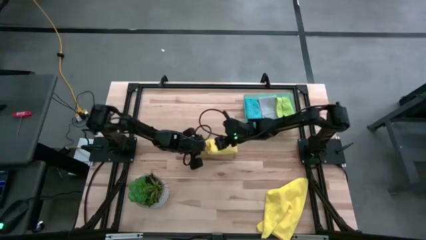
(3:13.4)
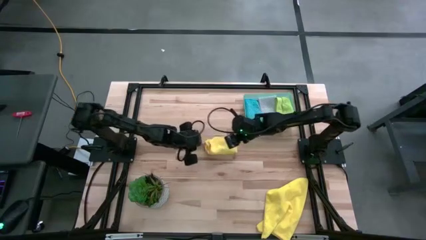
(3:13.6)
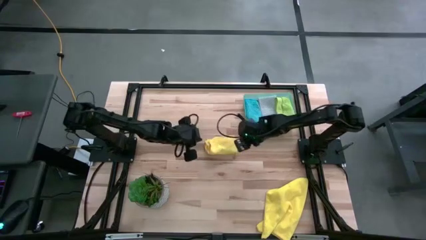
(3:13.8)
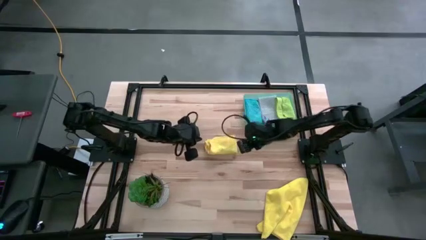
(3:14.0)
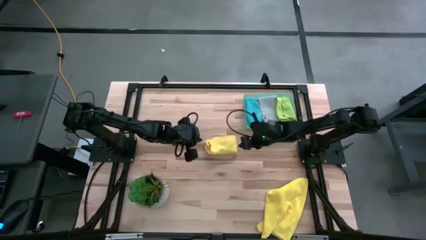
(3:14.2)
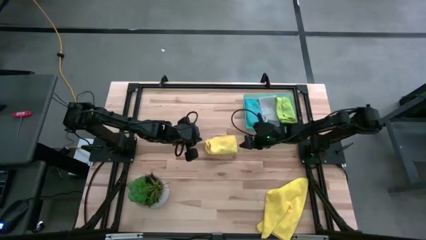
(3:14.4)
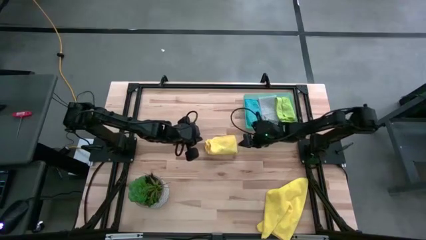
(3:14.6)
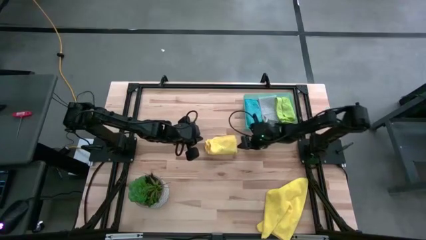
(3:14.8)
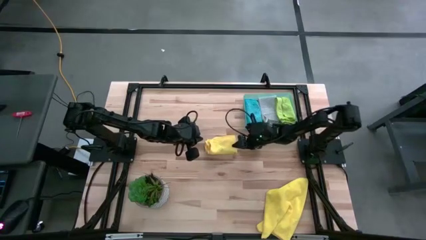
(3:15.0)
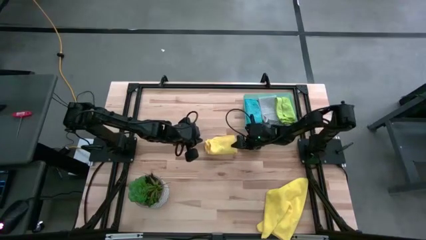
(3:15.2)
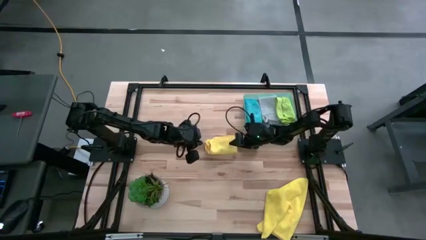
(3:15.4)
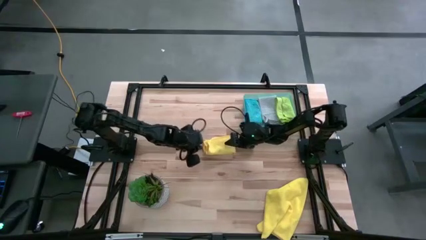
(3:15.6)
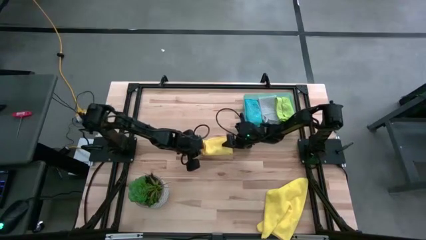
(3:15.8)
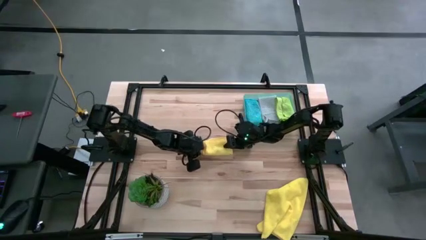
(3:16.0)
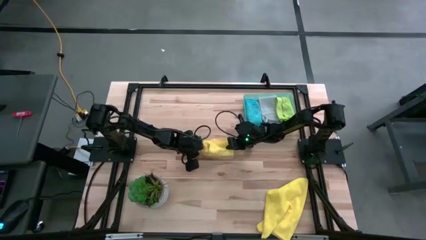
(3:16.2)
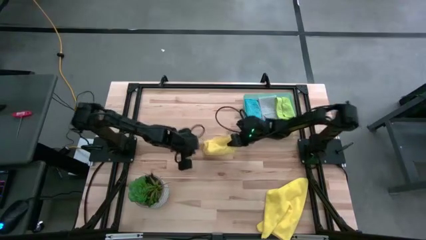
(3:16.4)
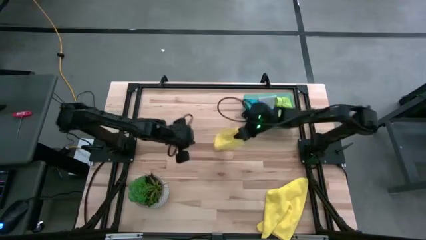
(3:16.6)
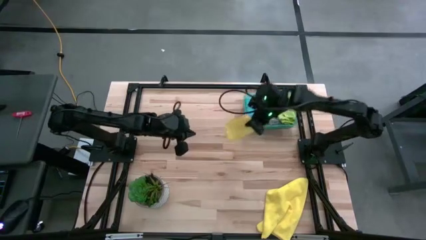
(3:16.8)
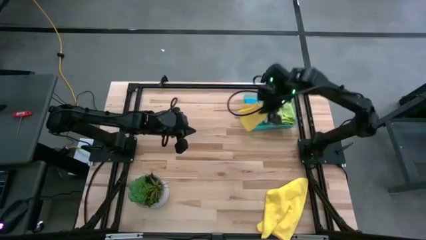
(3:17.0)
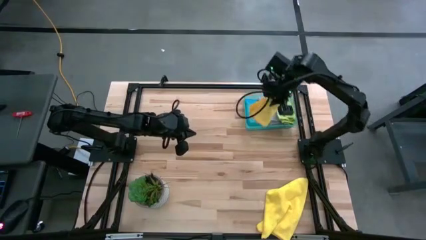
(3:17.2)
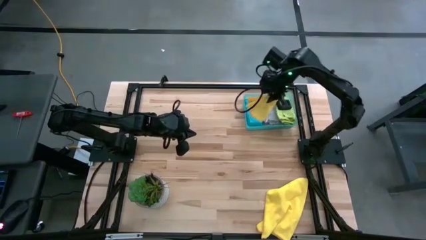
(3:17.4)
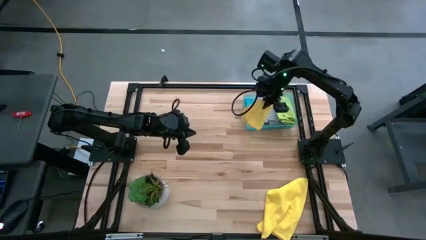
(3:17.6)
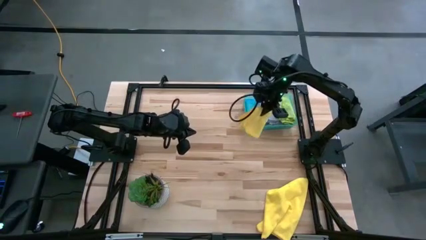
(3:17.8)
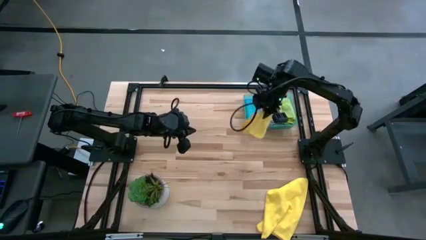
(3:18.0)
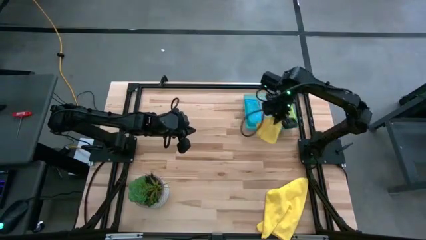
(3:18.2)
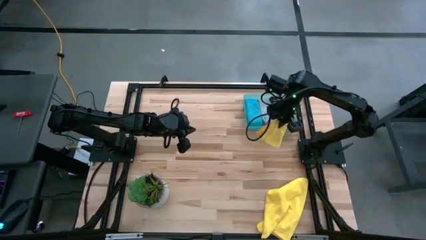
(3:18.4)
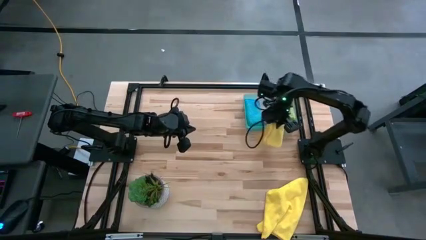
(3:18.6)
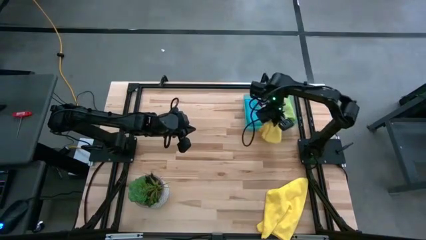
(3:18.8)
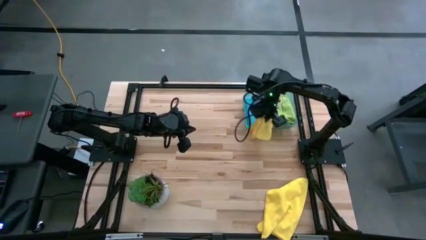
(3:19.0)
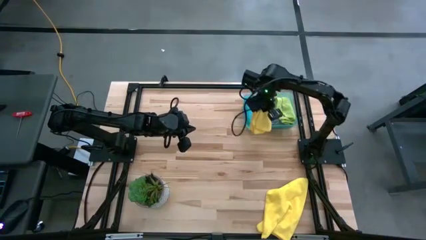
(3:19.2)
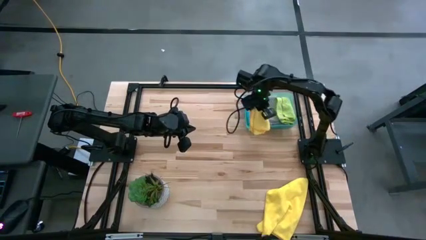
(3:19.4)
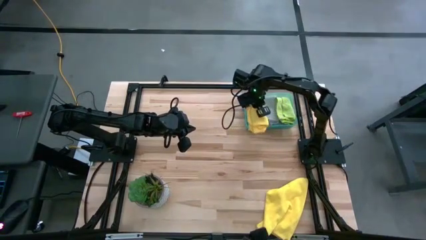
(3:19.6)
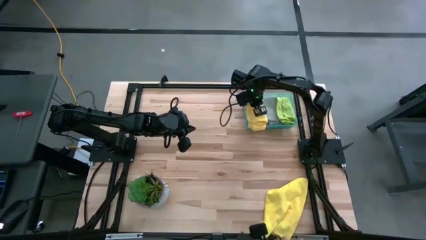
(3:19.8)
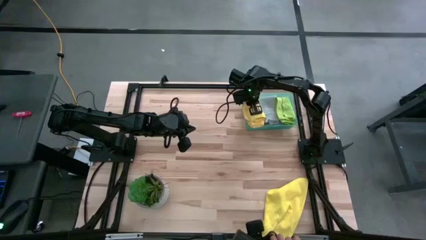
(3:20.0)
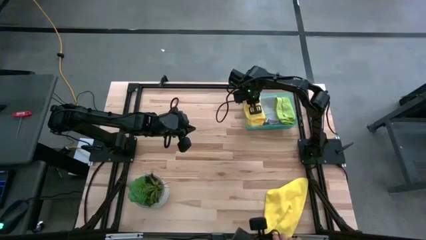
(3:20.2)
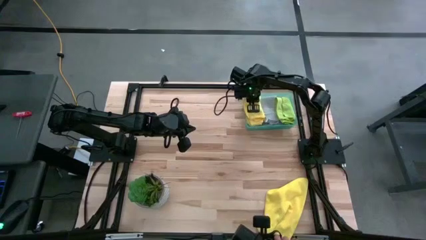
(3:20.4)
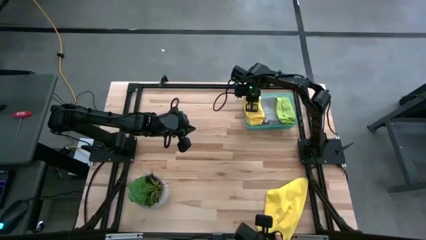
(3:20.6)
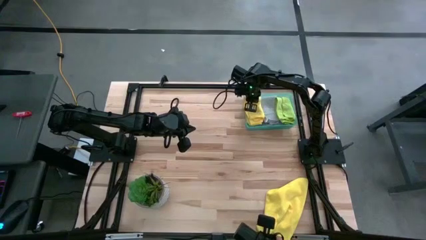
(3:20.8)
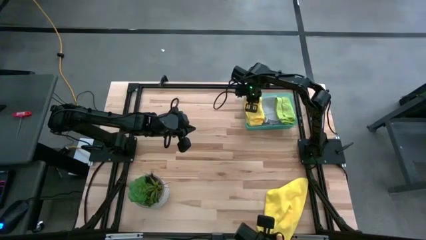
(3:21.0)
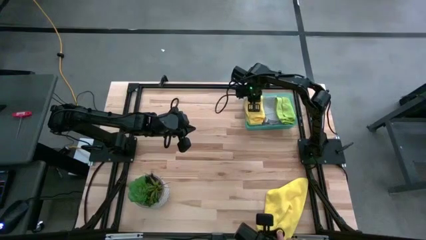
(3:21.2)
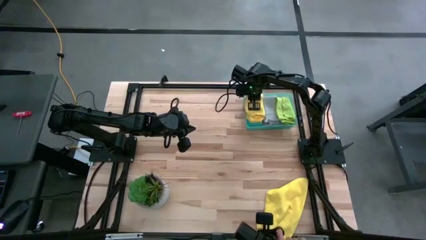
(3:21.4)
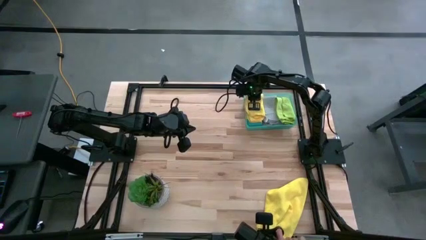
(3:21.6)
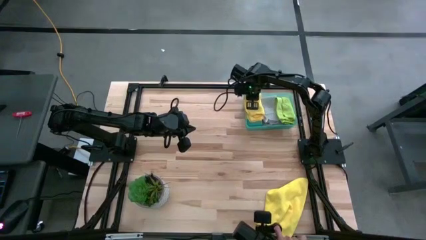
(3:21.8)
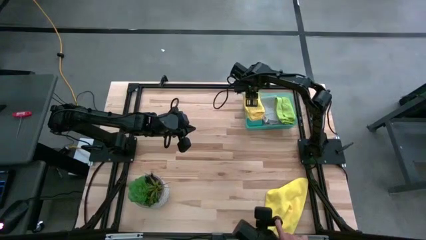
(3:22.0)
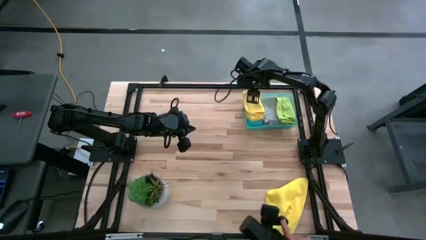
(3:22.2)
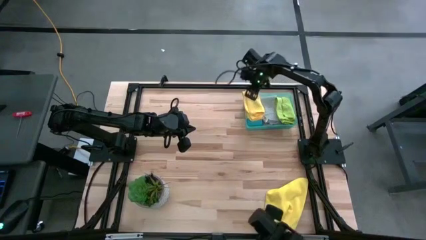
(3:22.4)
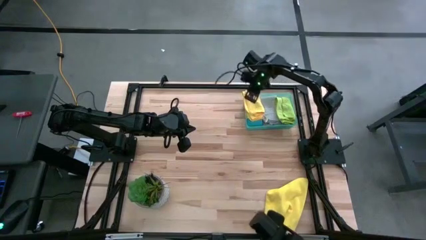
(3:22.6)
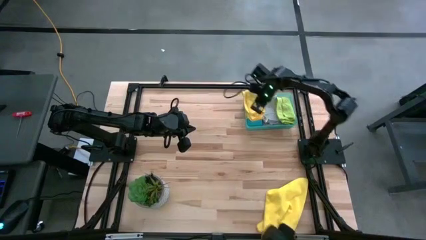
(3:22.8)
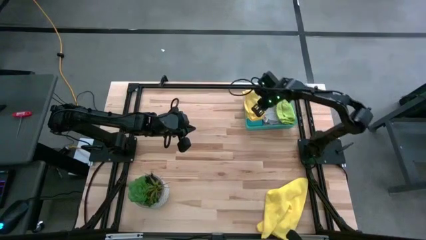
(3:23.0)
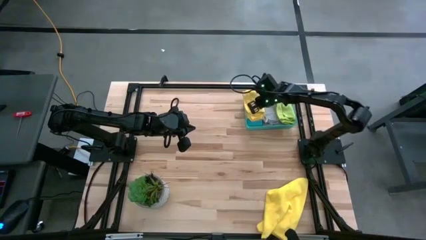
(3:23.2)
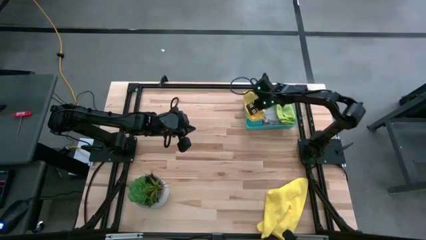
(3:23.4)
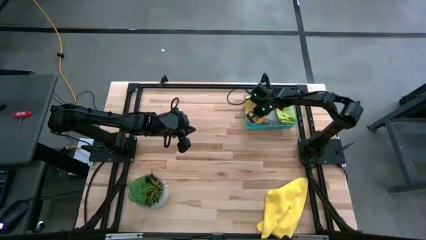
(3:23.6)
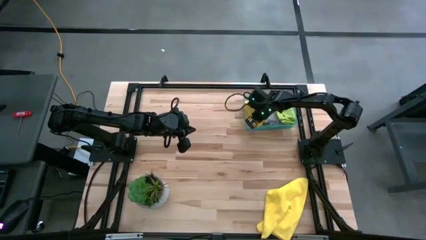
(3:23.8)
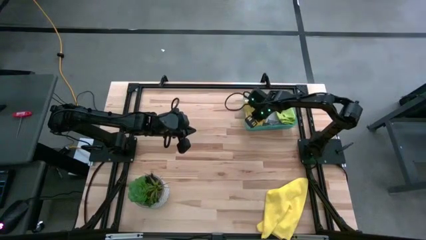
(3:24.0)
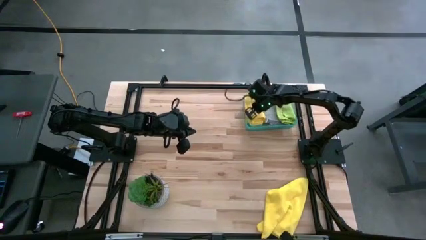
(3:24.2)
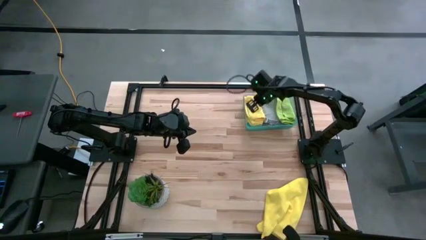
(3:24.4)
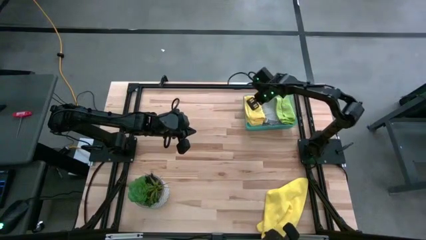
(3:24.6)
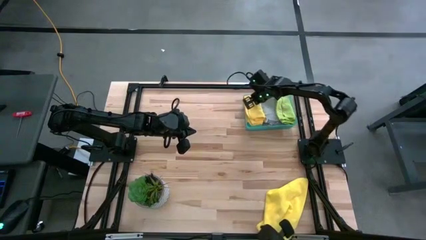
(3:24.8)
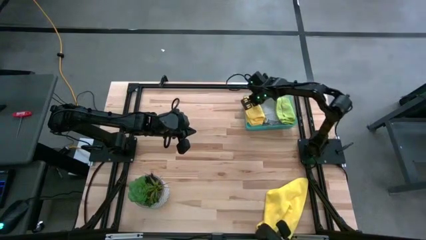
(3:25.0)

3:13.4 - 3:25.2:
Task: Fold microfiber towels
Put the yellow towel into the green bin

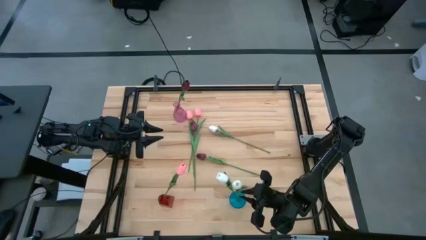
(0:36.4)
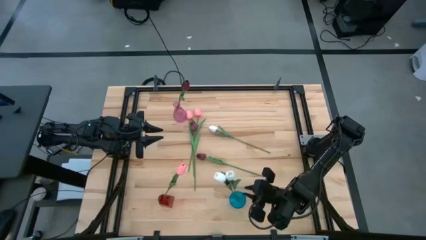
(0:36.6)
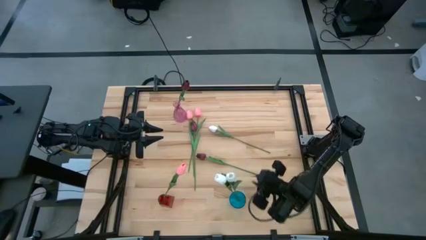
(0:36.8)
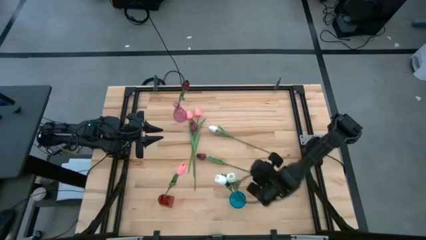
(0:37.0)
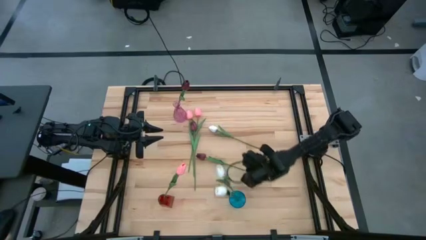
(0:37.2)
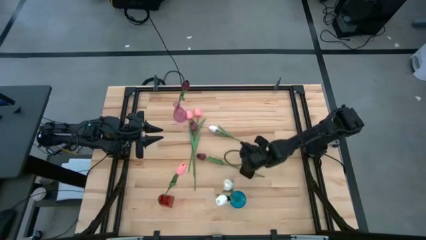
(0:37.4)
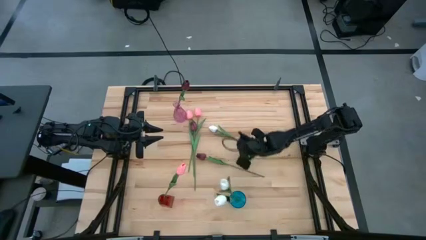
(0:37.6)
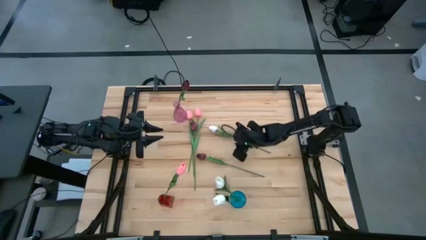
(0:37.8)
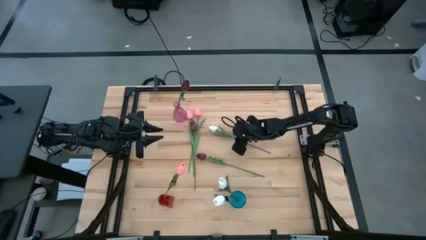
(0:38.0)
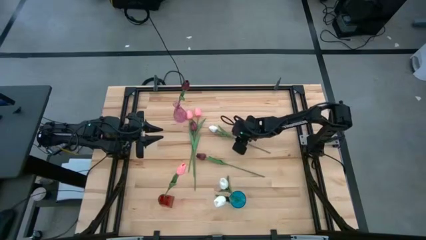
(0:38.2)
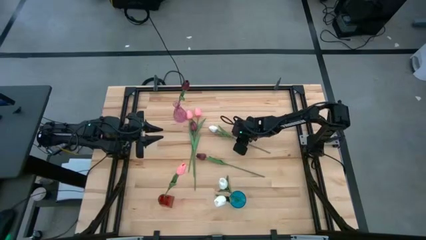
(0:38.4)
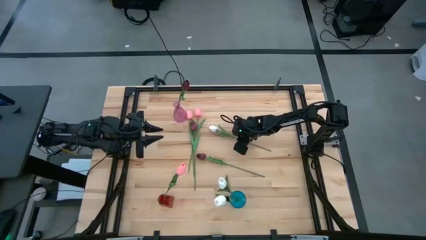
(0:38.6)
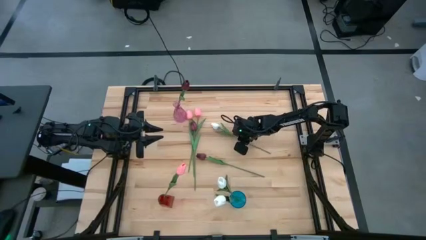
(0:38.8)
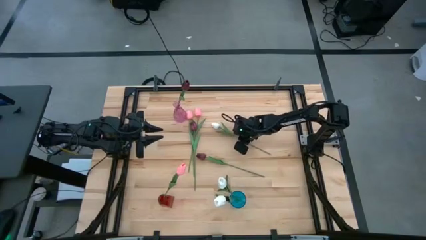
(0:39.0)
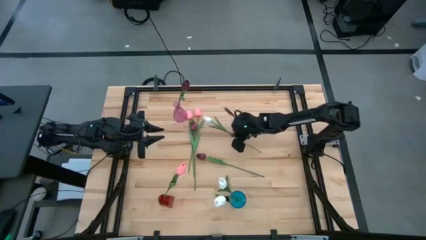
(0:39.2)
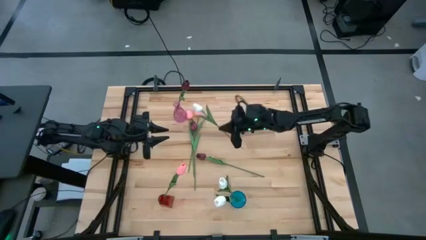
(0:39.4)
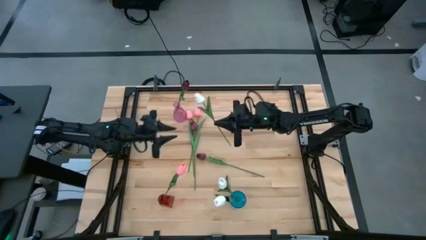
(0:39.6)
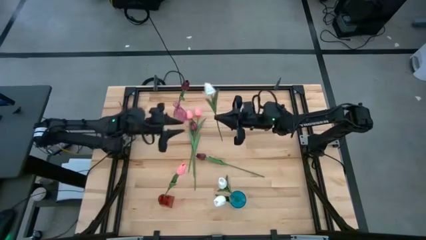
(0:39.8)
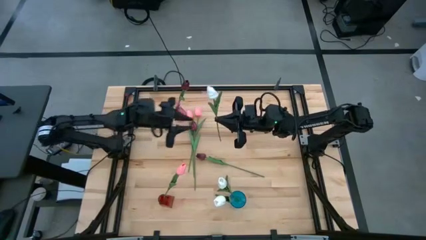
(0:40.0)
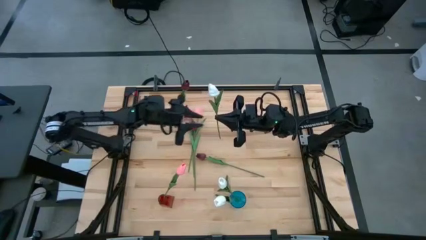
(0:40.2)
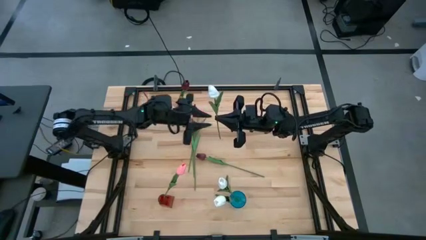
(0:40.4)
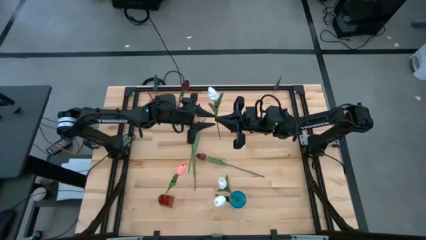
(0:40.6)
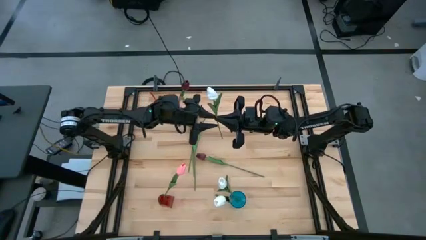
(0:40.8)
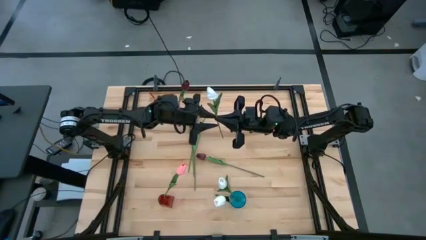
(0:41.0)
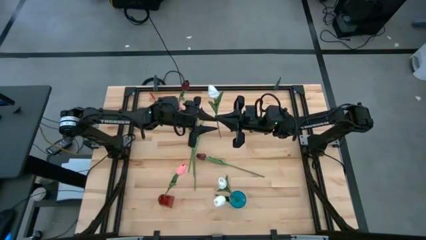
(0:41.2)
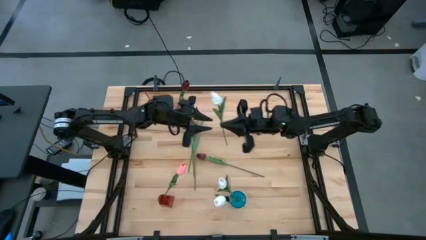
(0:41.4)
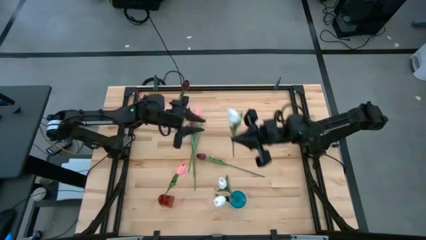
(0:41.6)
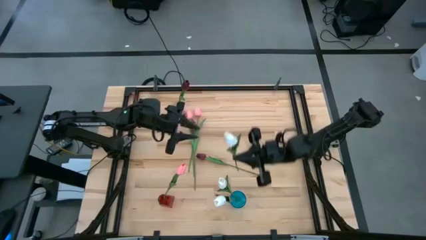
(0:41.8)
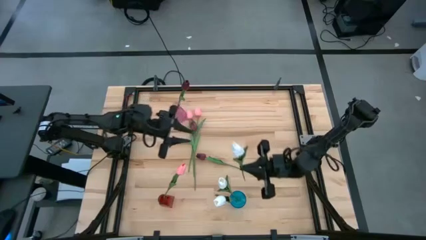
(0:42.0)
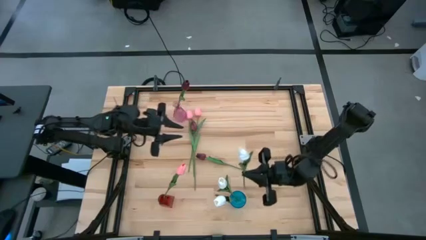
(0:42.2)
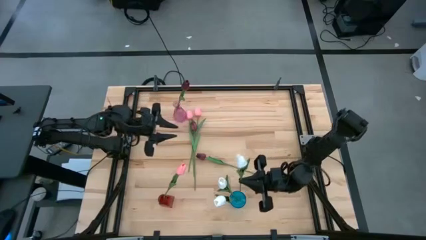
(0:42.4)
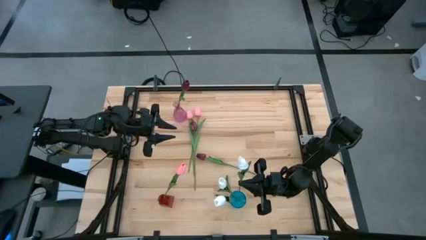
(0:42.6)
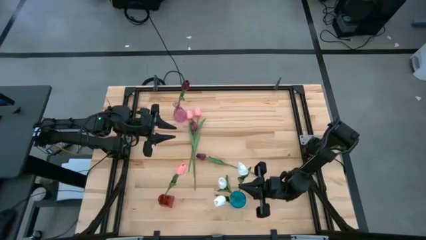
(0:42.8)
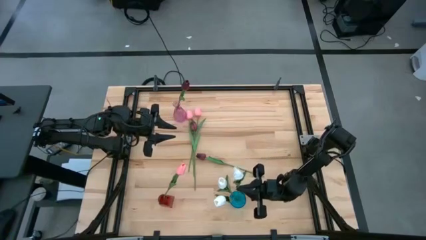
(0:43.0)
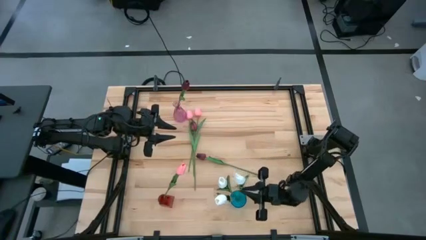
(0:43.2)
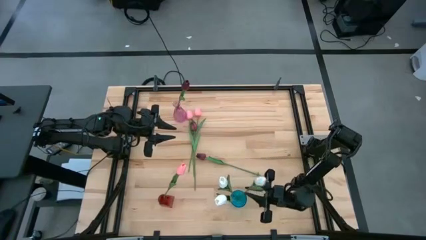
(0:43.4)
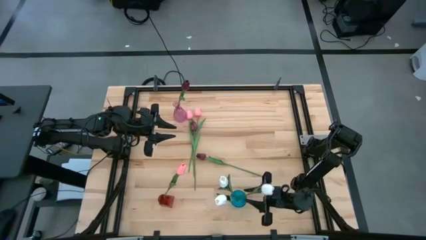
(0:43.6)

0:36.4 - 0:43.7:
Task: Sort flowers into vase by color
Put the white flower into the blue vase
